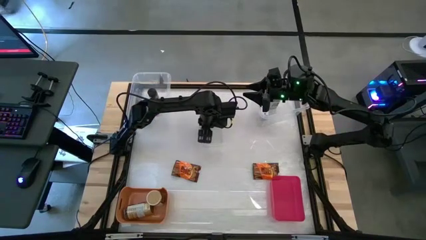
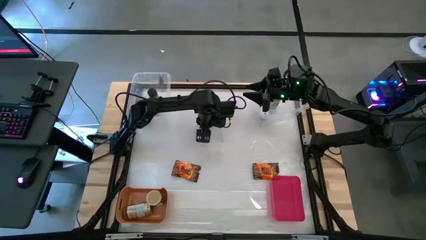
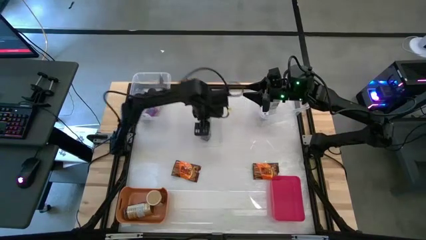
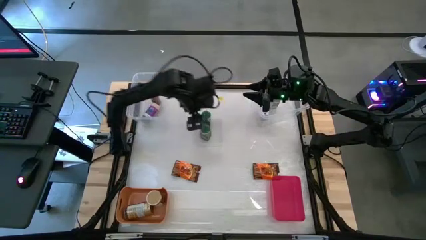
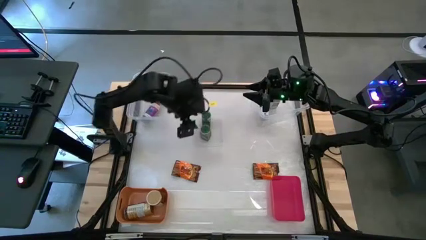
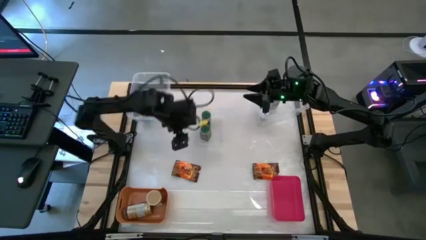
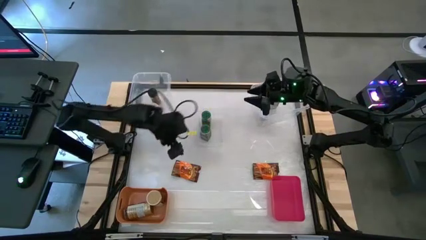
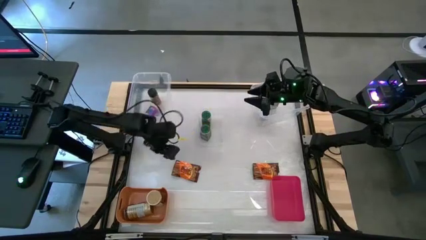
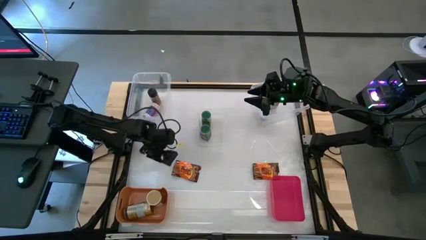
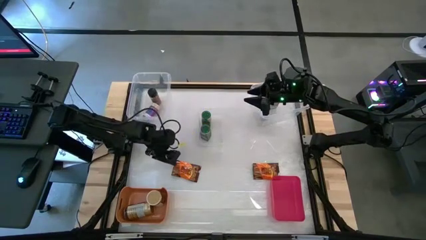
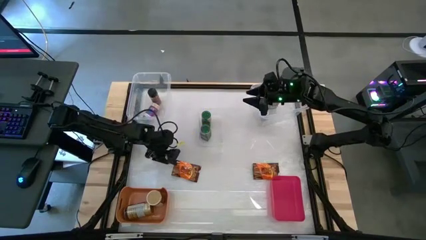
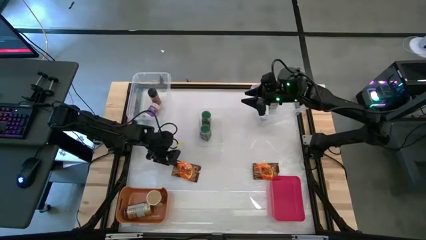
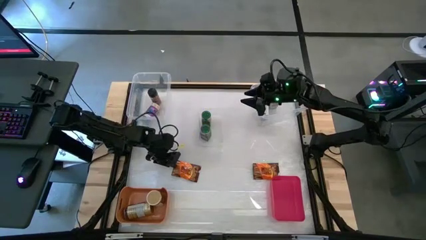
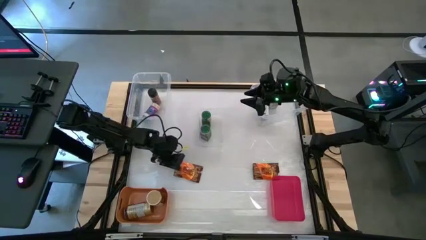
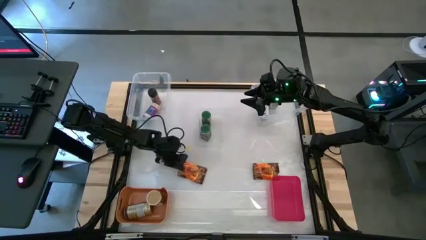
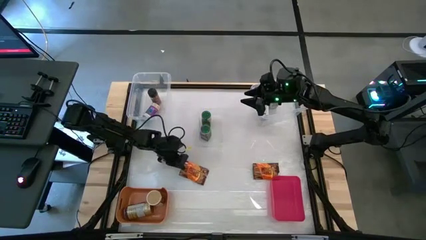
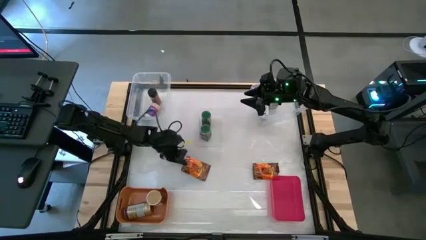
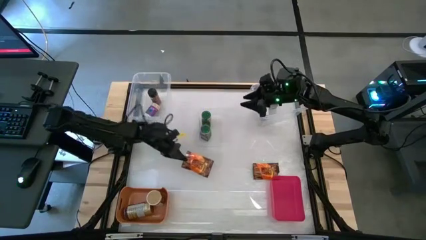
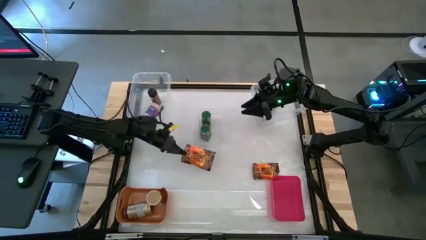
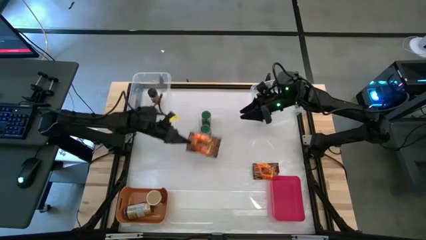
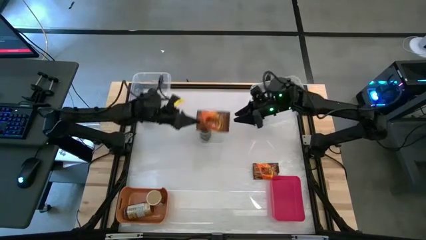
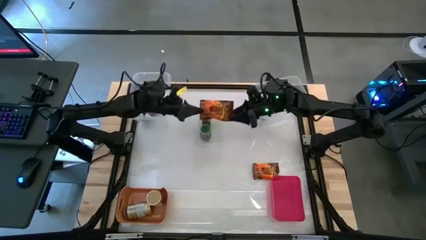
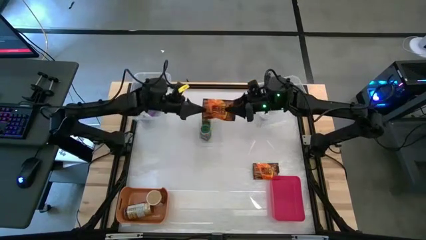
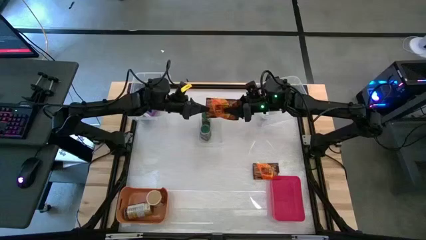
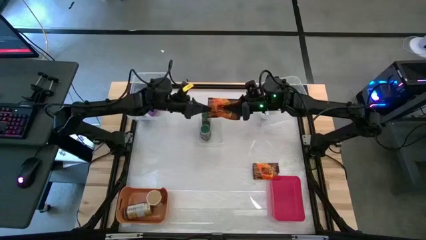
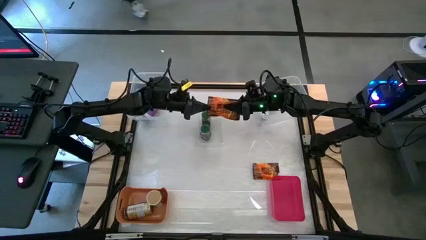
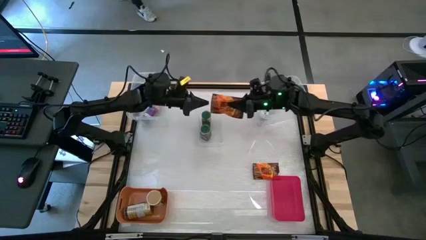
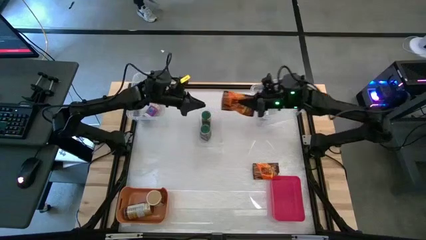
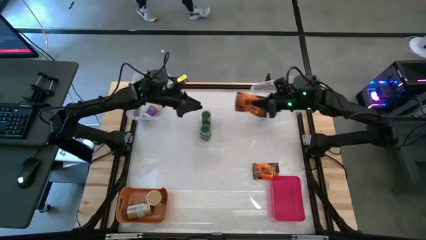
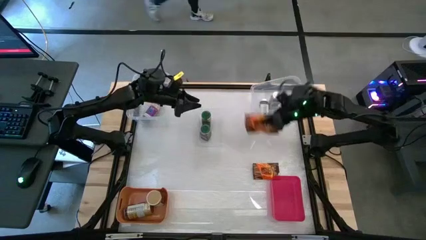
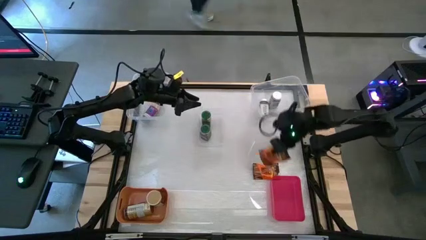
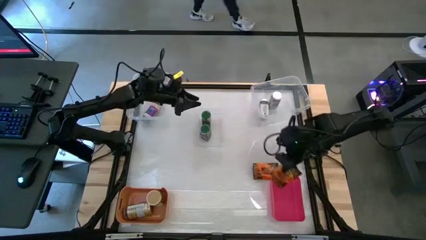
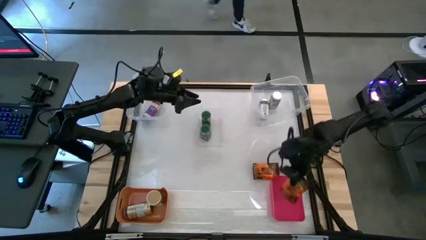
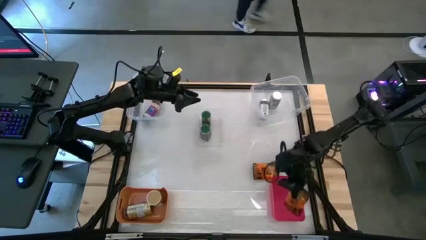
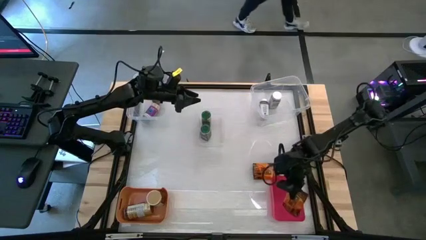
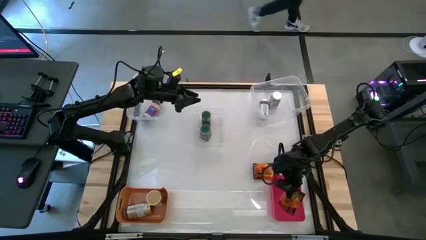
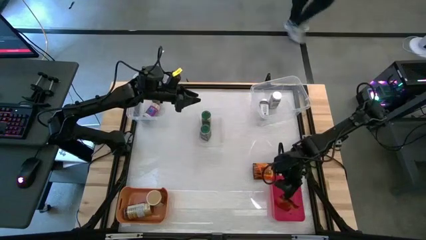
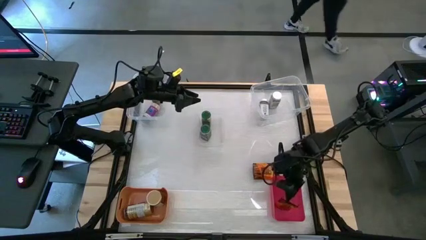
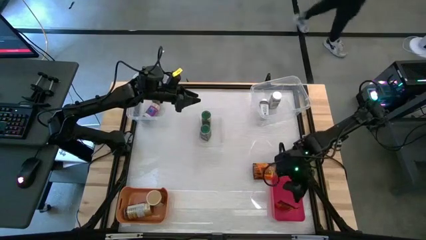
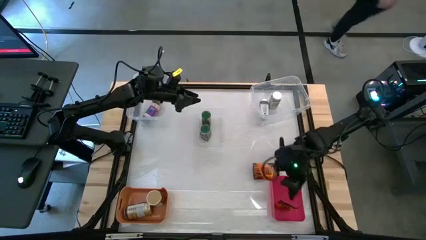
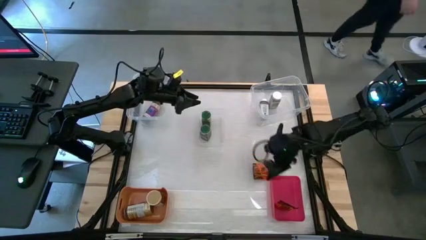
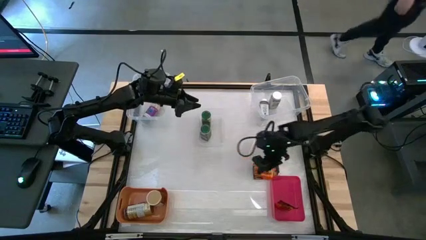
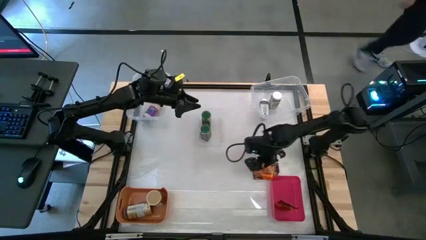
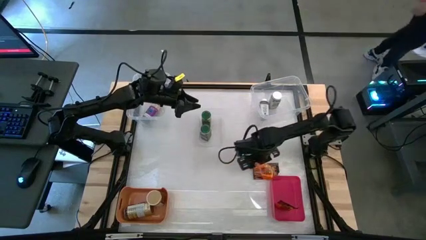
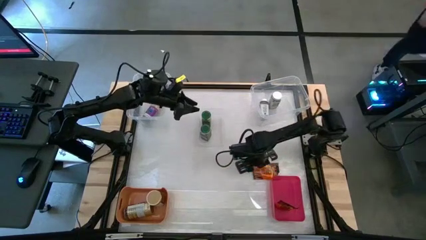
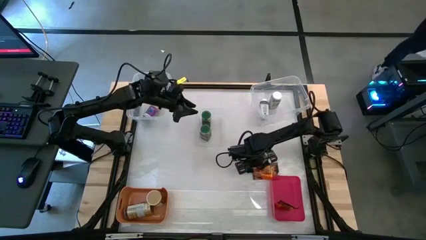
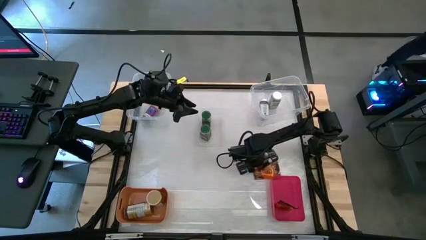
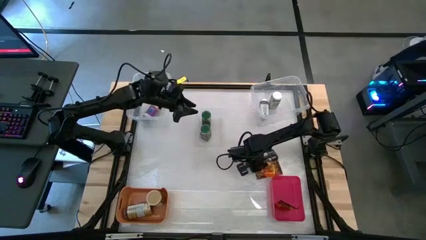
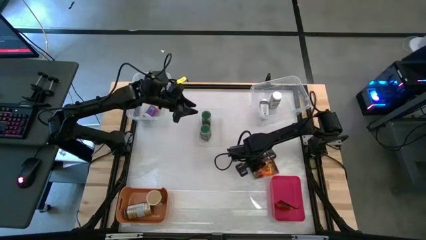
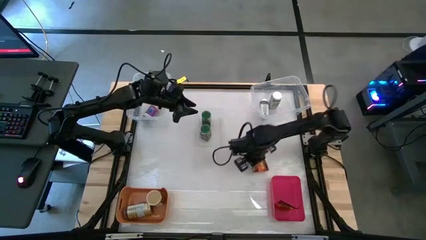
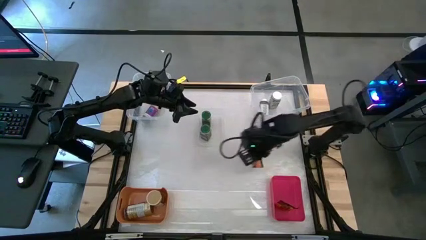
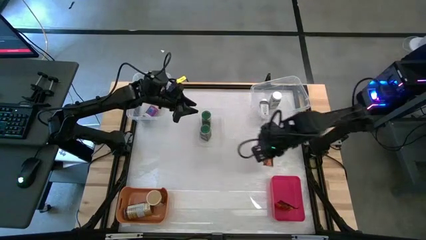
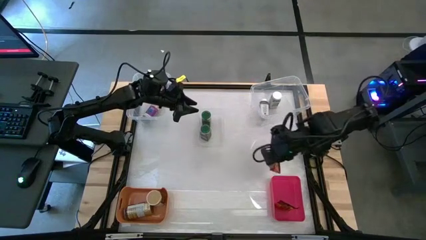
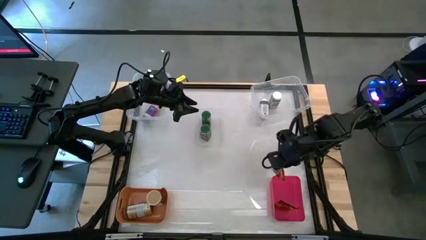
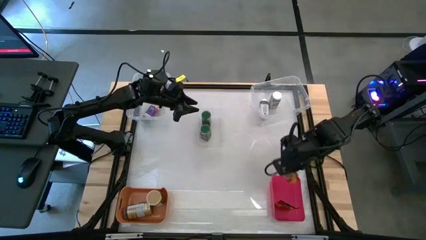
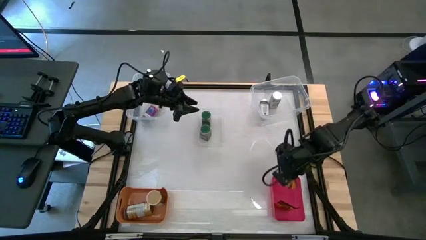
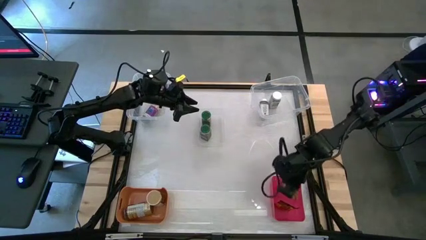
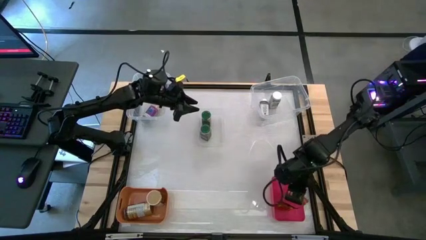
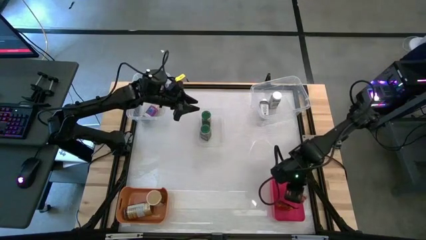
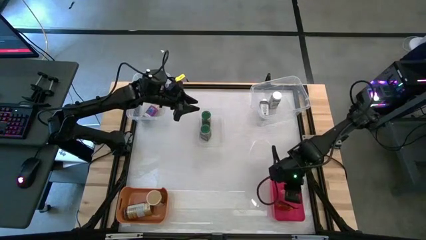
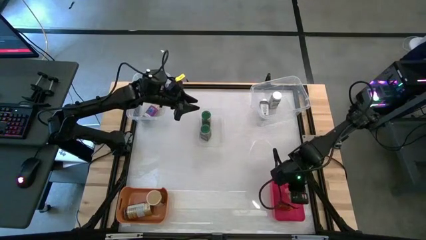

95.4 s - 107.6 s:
Task: Sort spices by type
Put the left orange seasoning bag into the red bin
